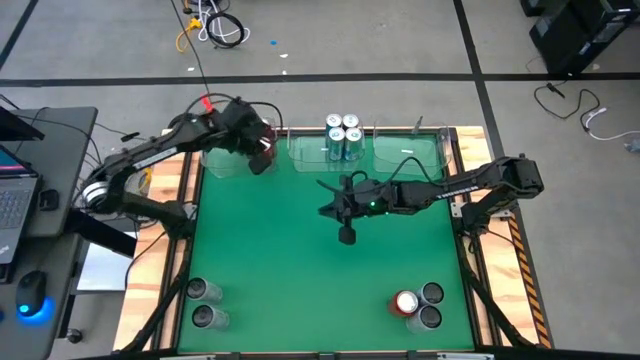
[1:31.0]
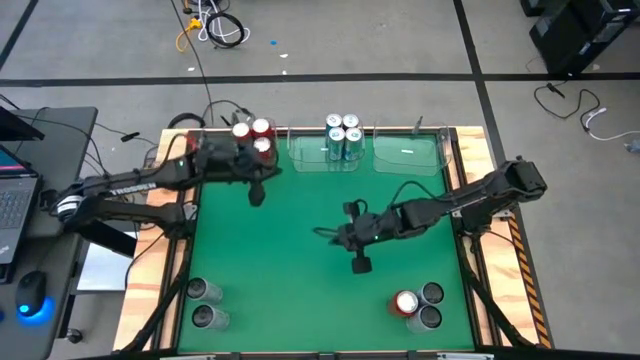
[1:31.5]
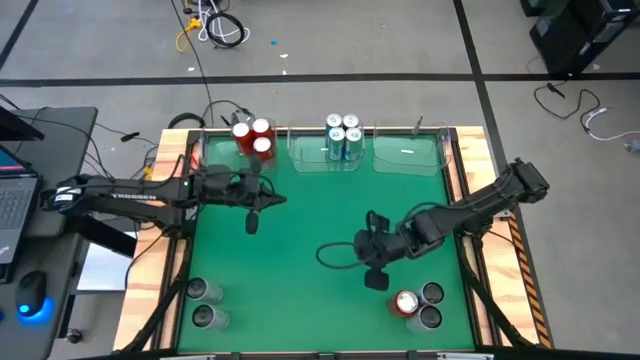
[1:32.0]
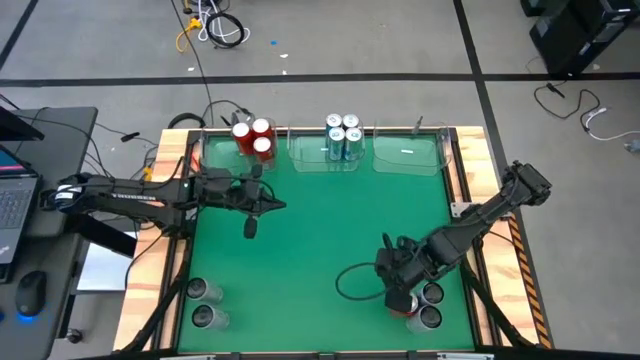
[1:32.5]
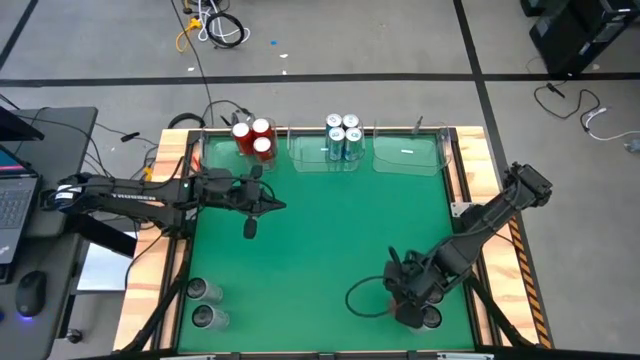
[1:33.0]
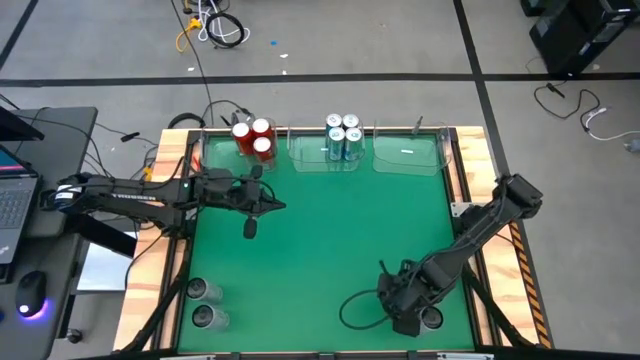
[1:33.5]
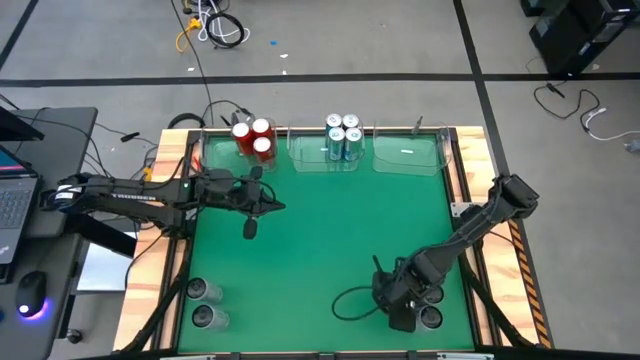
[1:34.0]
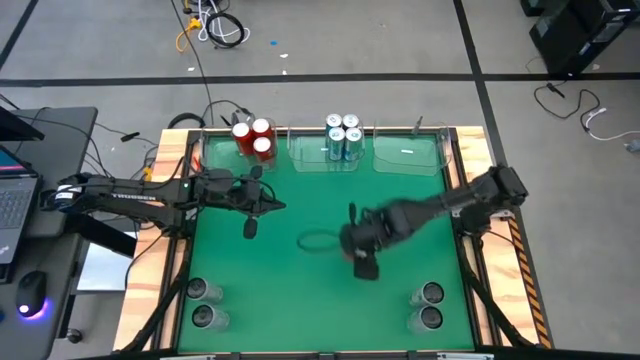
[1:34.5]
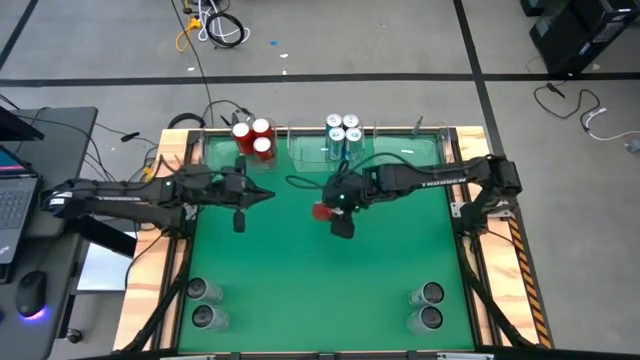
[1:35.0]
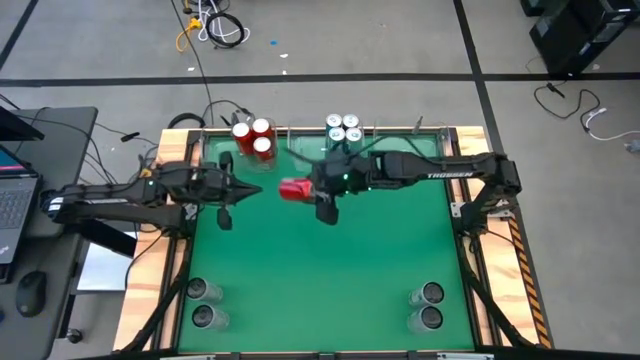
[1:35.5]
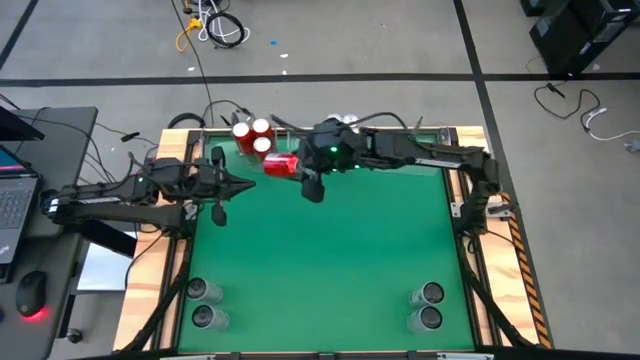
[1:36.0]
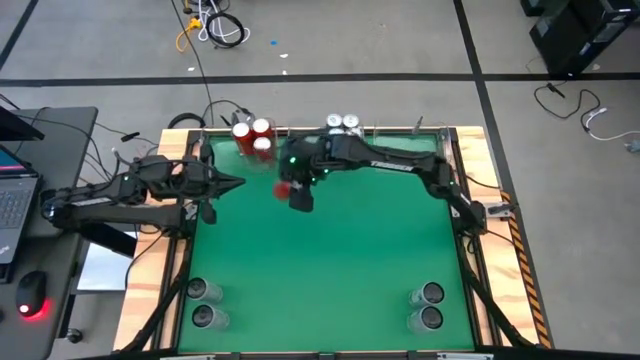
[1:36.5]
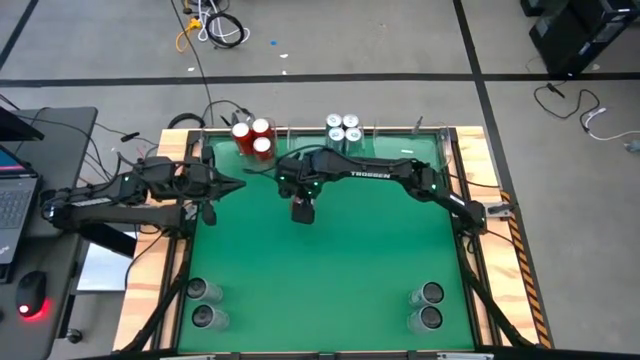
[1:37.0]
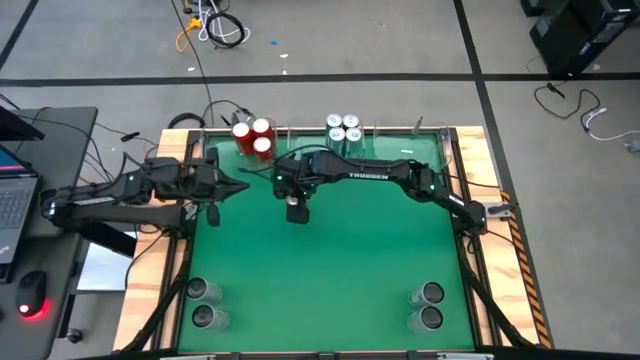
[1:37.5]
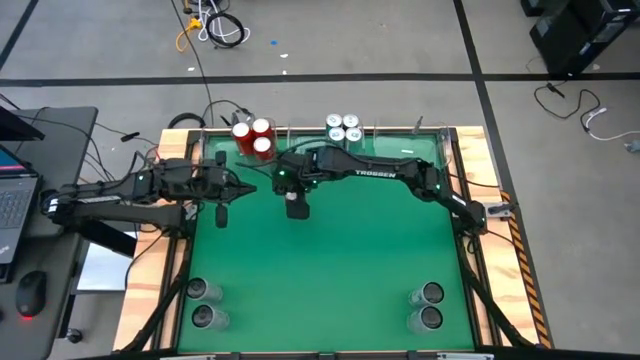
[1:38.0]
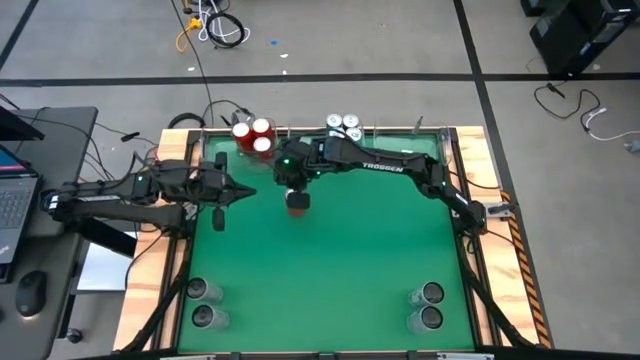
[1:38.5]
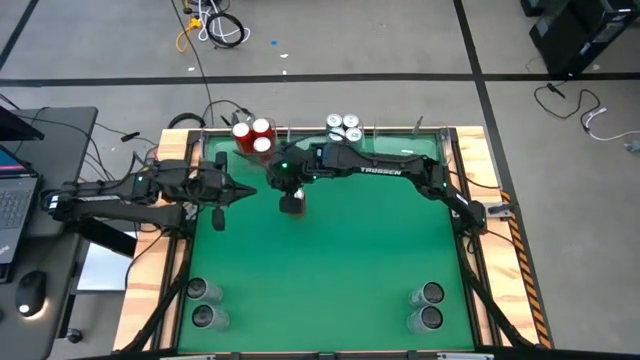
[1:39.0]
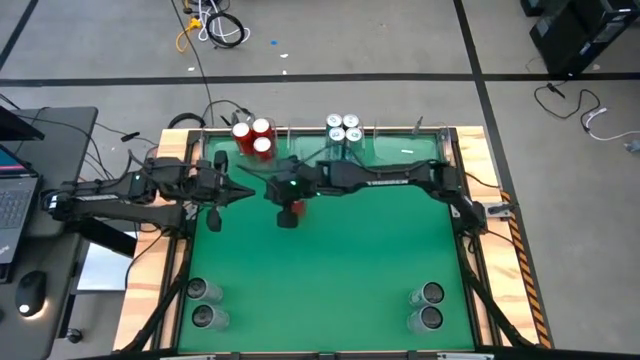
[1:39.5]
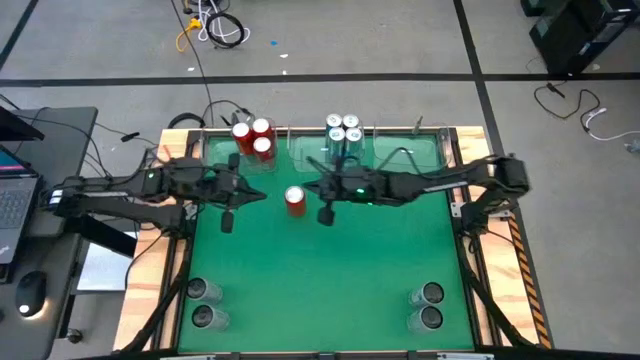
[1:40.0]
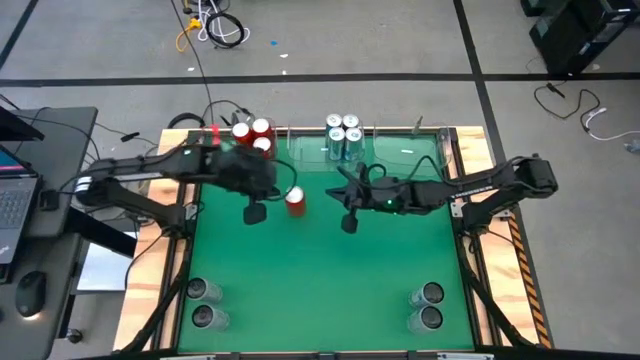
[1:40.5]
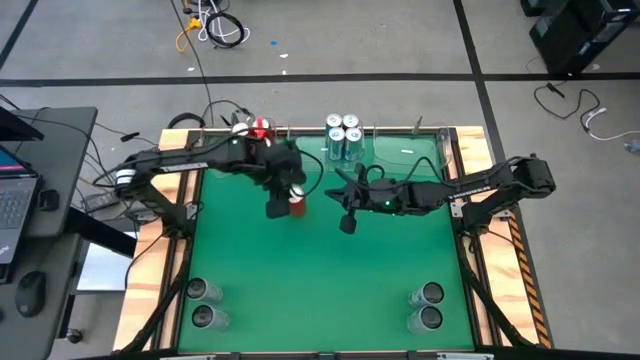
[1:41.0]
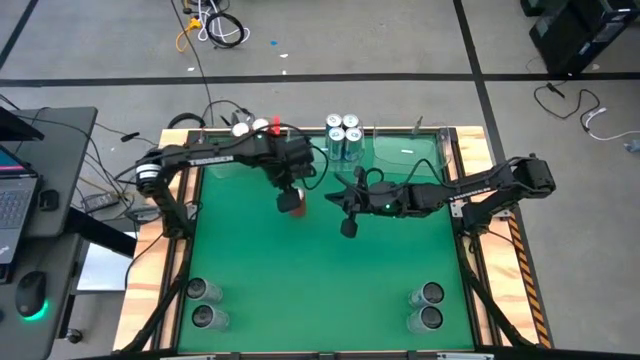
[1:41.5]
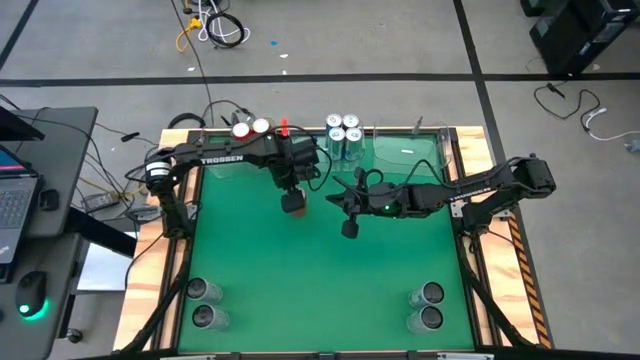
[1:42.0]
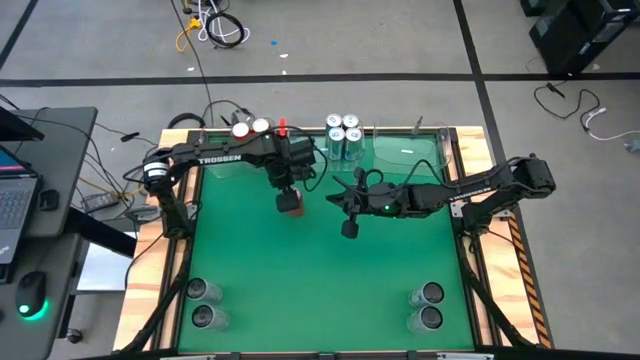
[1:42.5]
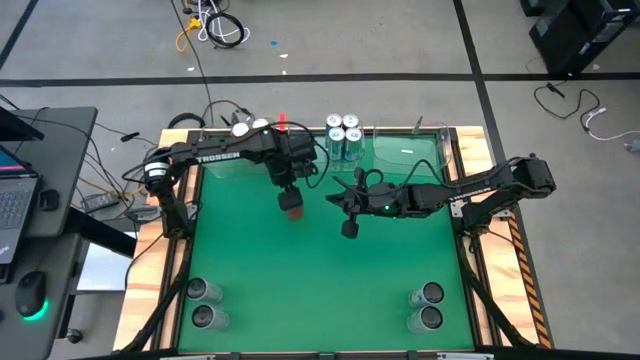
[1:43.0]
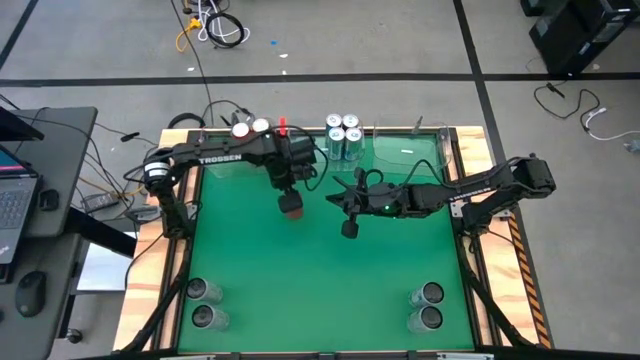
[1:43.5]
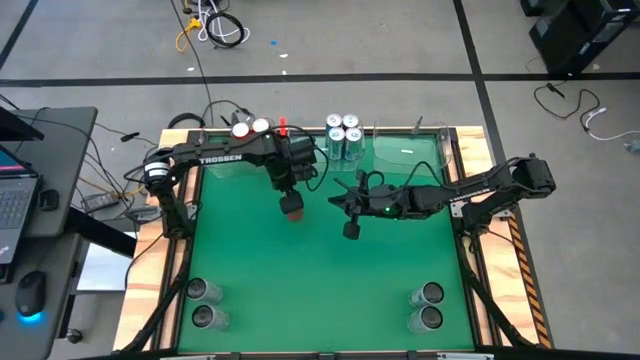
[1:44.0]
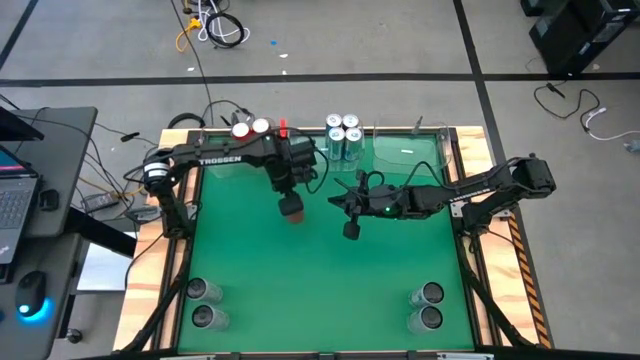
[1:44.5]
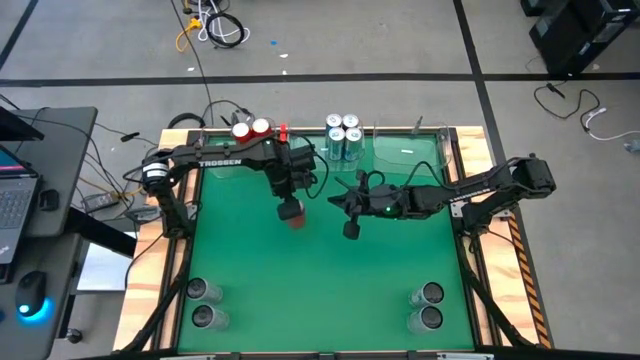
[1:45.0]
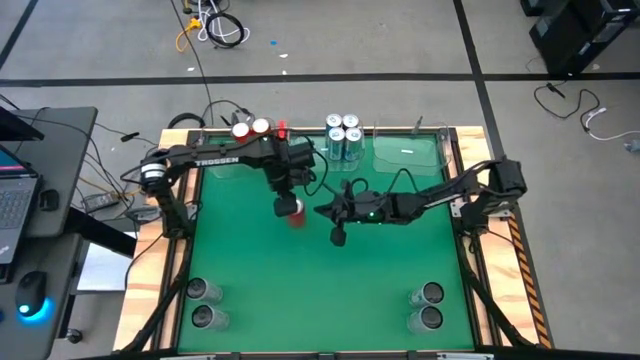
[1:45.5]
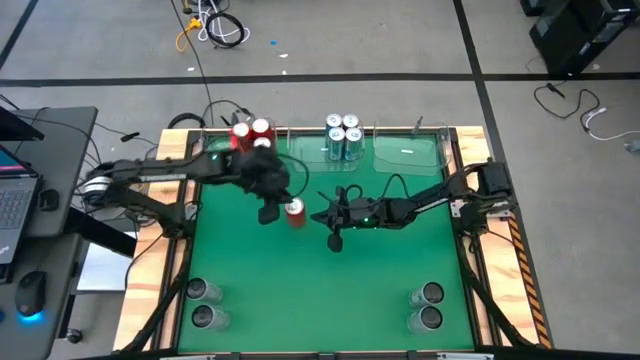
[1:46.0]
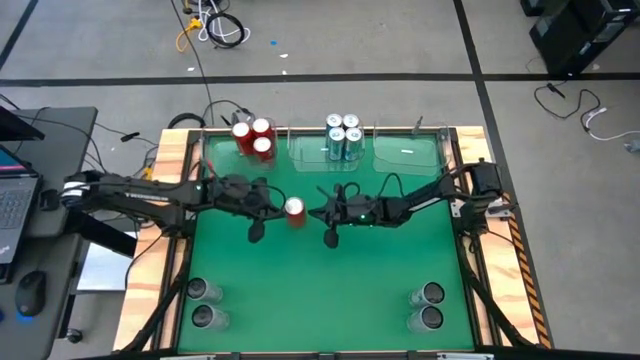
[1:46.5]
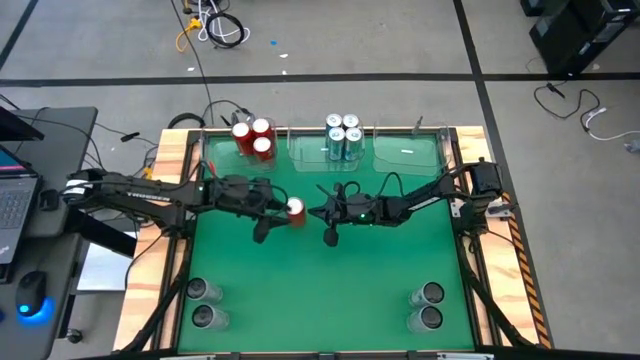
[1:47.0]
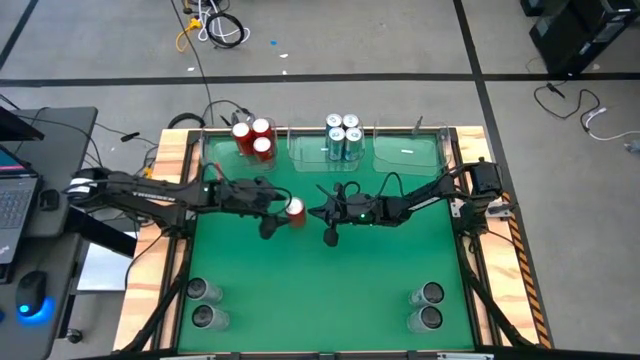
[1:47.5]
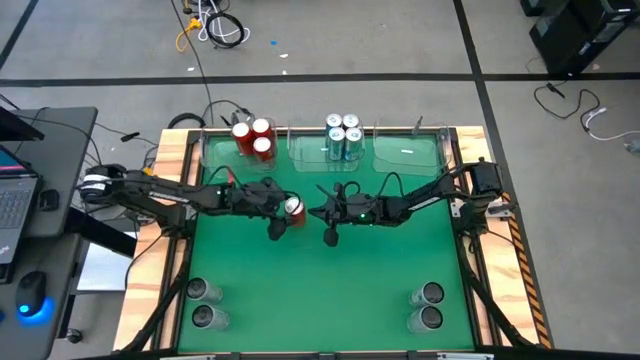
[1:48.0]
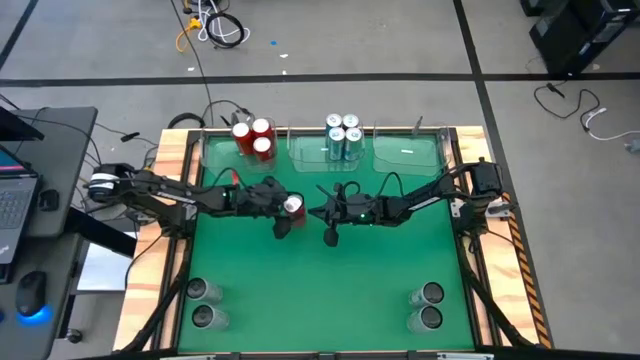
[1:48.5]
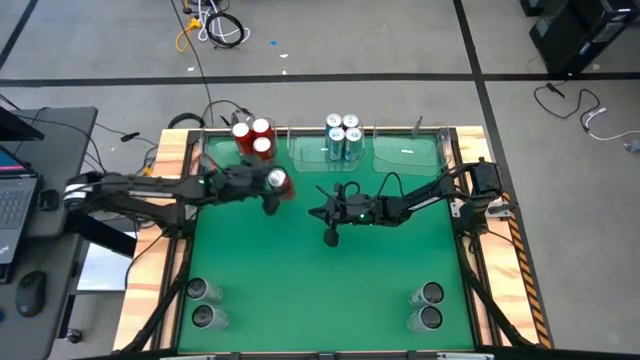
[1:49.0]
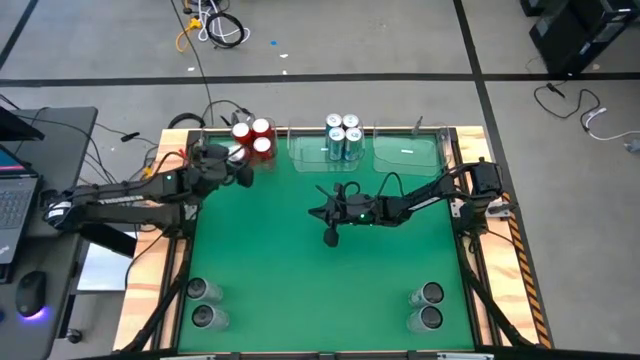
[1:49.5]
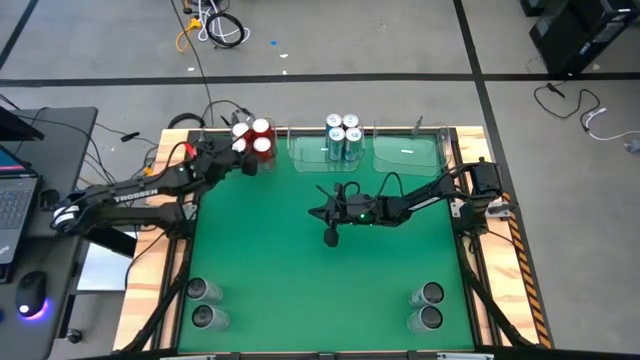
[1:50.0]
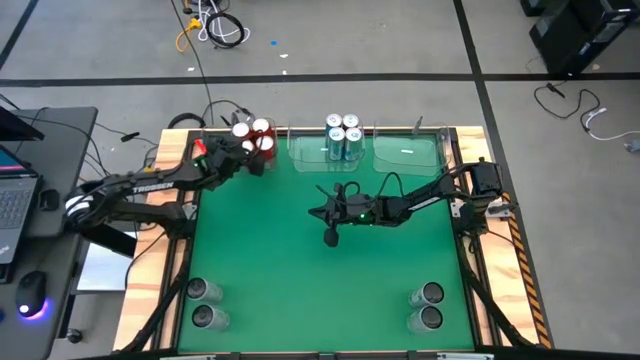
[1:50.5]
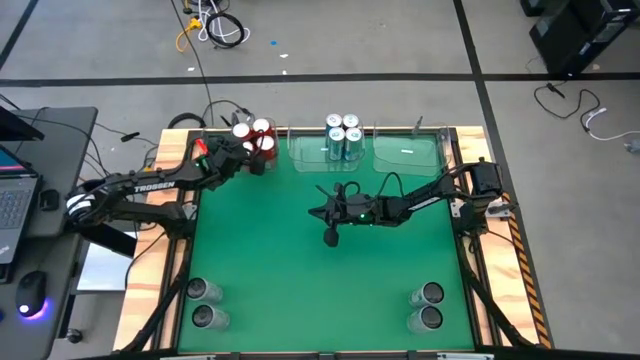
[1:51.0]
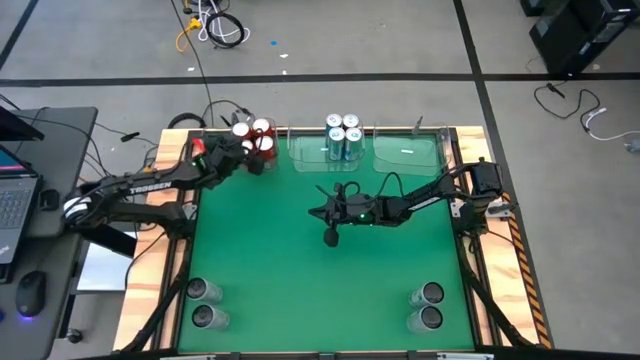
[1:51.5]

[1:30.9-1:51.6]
Task: Sort soda cans
Put the red soda can into the transparent left bin
